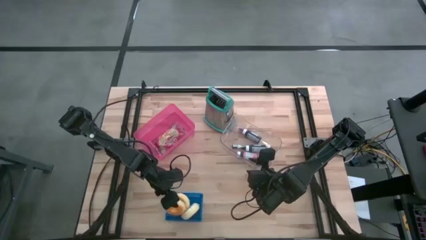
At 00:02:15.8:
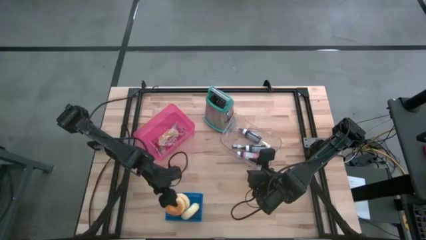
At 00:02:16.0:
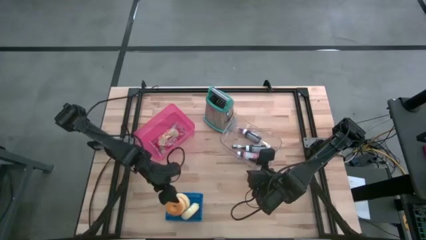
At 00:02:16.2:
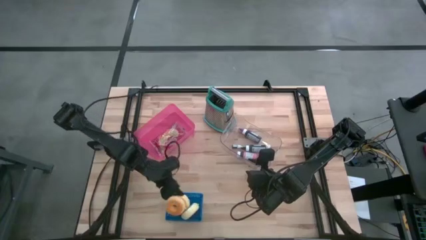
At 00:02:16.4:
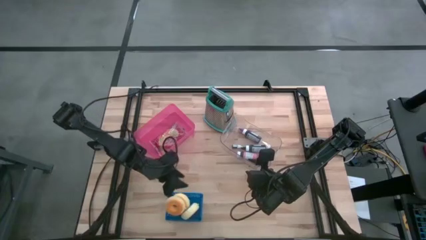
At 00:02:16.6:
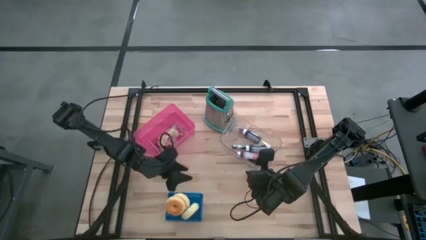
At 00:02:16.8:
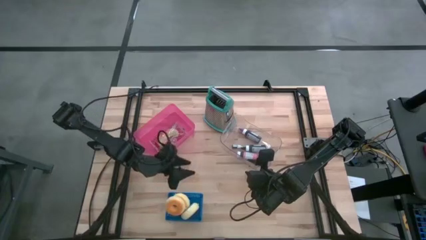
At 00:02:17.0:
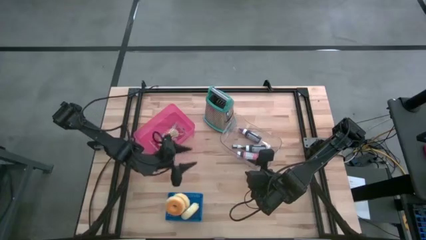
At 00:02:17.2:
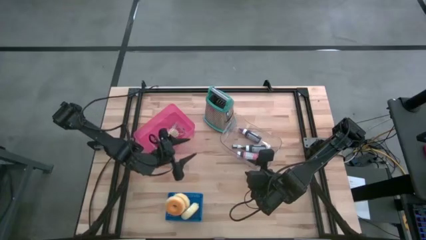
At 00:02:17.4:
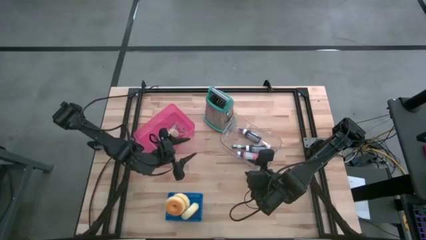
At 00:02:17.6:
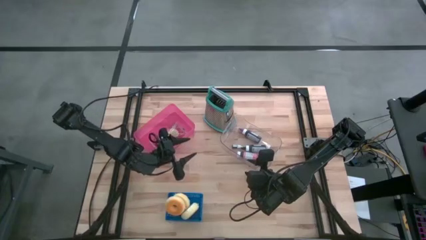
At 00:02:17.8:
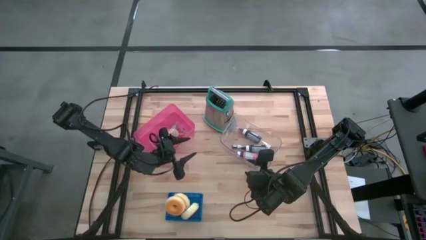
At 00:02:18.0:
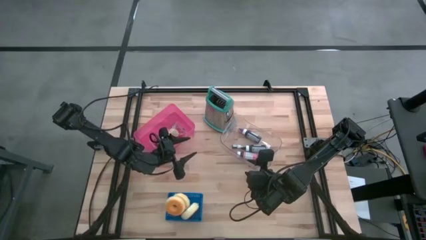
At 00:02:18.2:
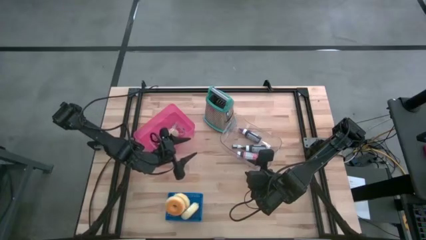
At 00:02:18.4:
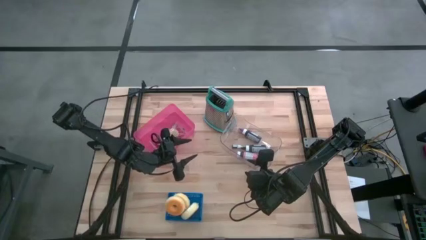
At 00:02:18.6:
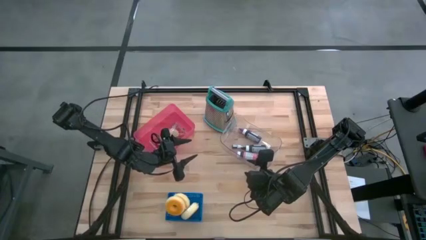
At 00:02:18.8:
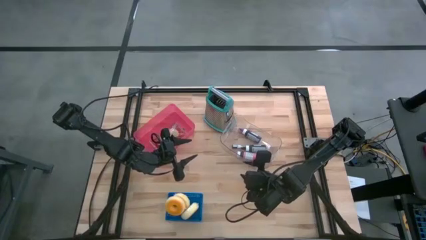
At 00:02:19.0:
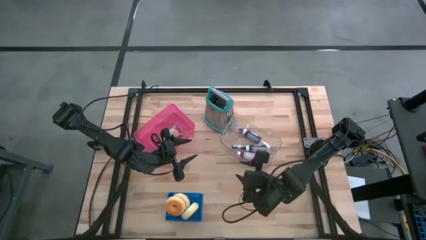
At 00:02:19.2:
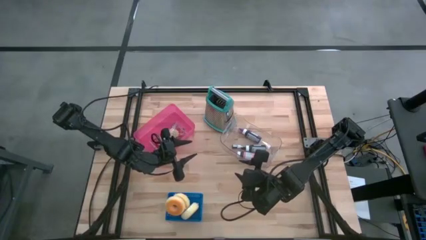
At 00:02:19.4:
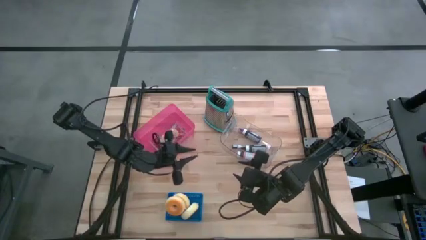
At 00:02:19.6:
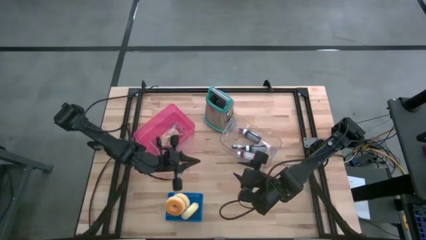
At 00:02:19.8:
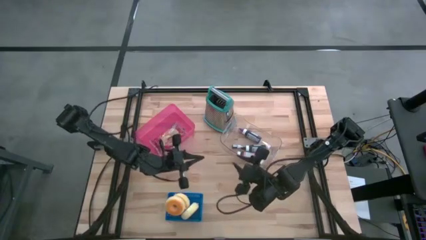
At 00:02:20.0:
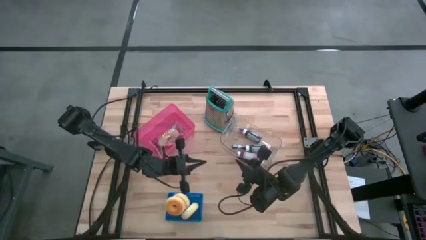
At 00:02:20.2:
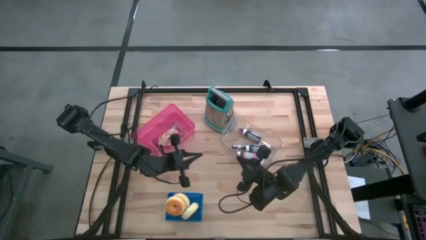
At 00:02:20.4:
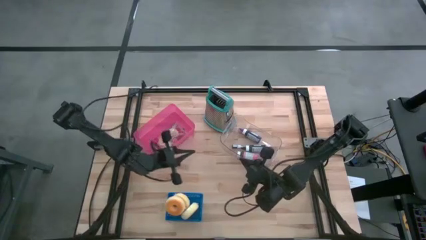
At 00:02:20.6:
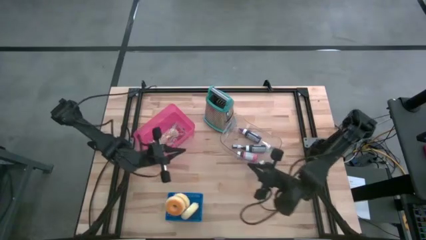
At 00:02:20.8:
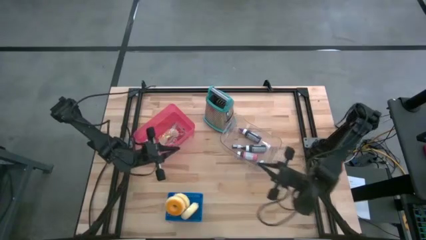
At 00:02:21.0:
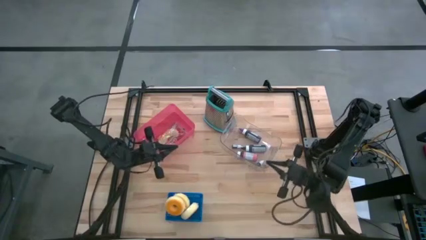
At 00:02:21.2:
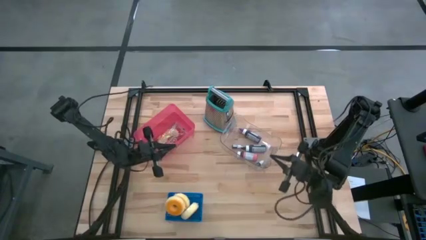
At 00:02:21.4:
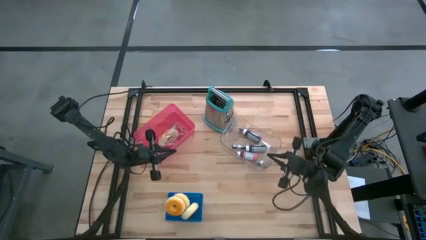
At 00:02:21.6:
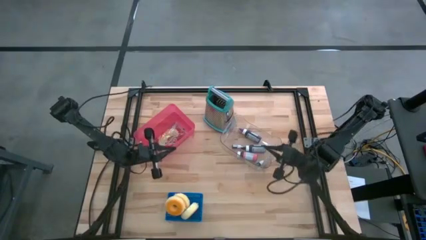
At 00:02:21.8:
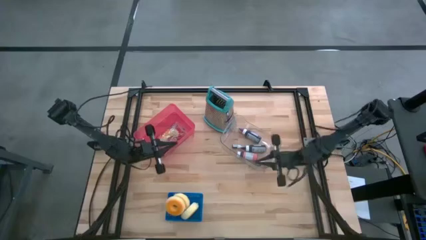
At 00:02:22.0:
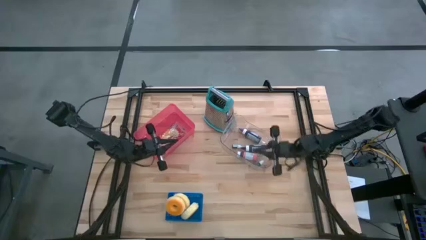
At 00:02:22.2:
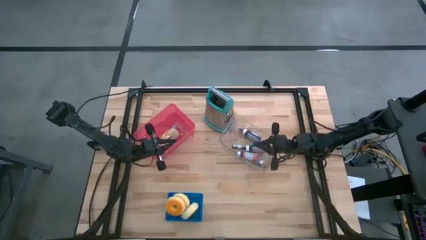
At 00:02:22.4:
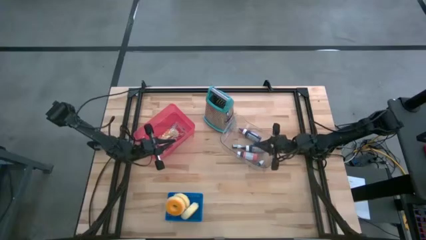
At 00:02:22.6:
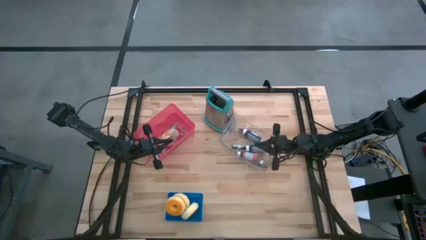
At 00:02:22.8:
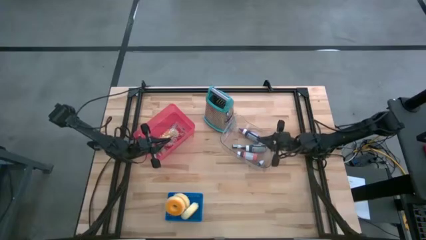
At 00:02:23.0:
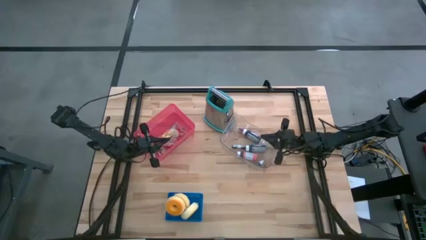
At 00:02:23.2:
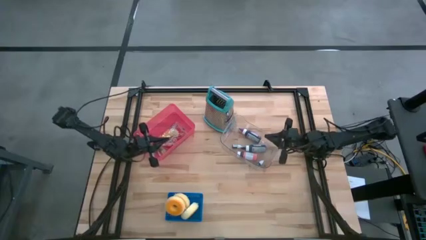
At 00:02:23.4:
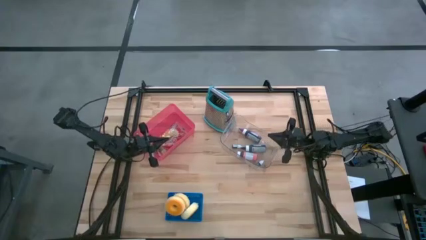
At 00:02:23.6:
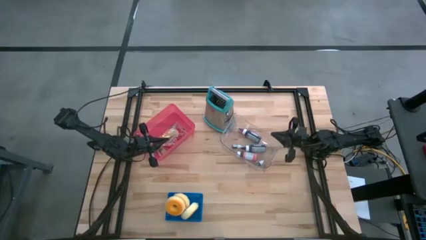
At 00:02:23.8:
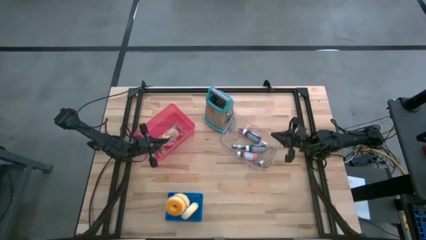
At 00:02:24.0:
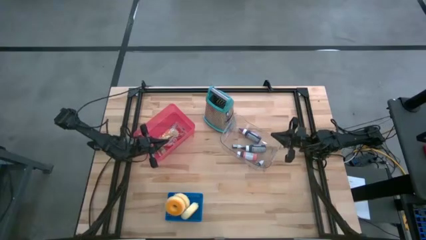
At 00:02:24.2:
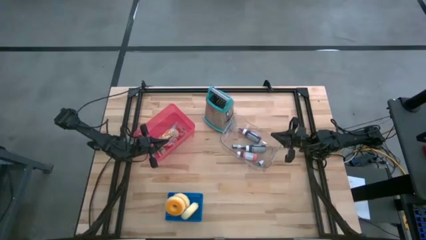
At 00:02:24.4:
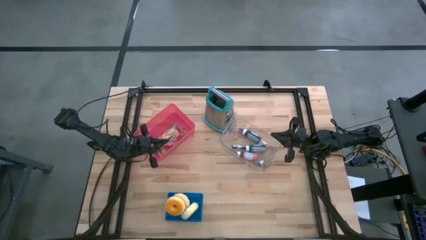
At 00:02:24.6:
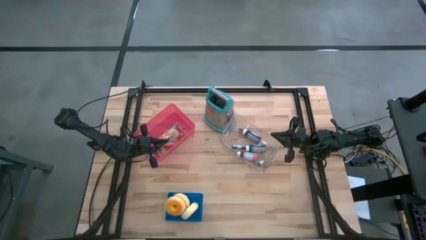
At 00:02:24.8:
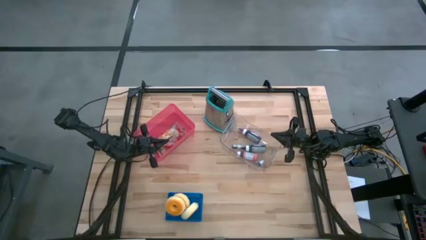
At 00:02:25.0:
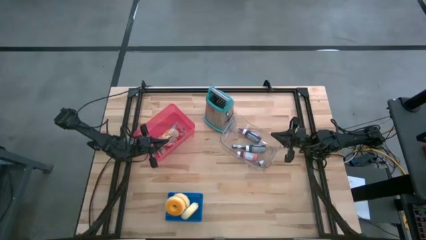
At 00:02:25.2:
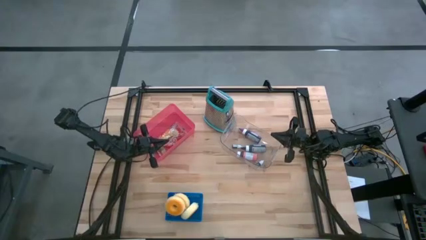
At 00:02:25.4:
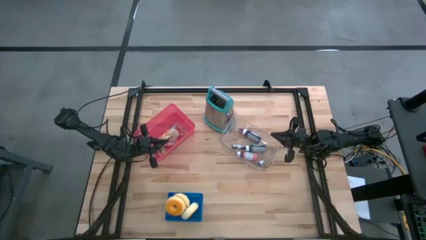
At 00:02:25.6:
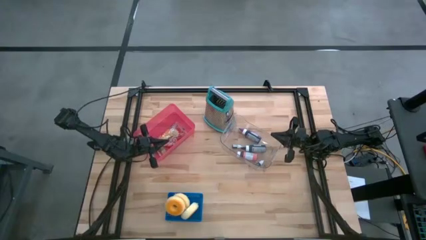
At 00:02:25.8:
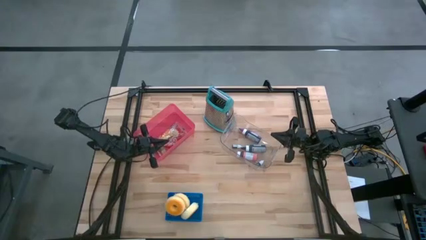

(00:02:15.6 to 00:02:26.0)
Task: Pick & Place Food Item
Return to Home Position

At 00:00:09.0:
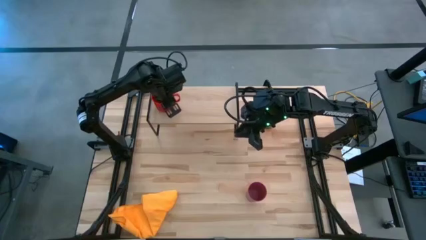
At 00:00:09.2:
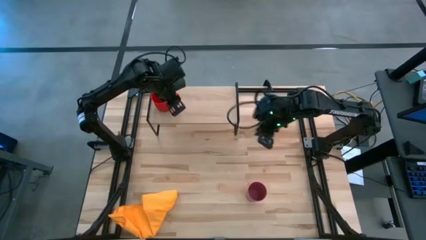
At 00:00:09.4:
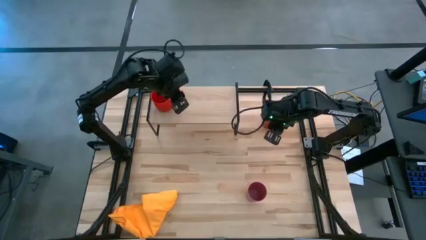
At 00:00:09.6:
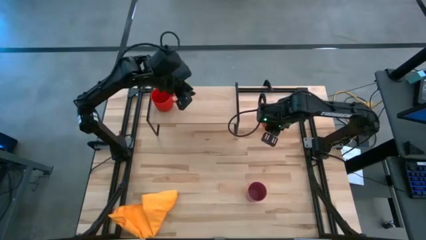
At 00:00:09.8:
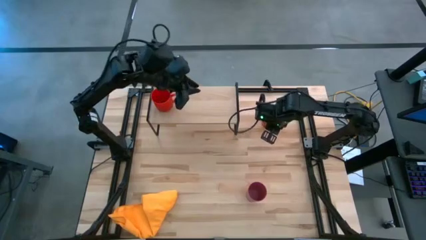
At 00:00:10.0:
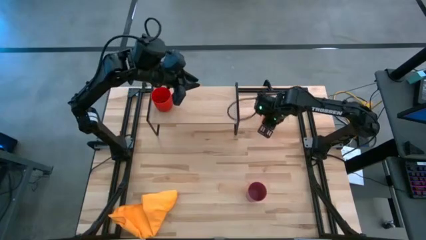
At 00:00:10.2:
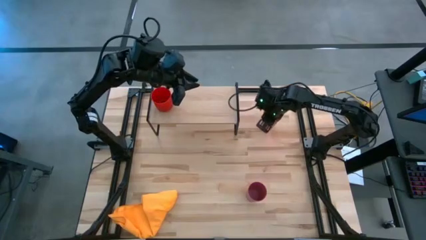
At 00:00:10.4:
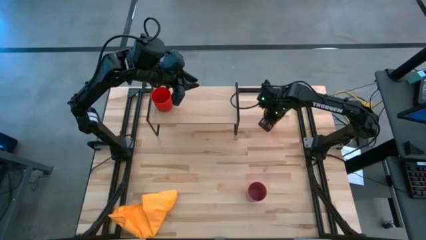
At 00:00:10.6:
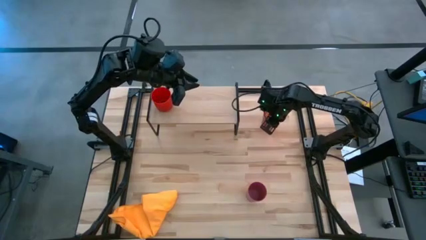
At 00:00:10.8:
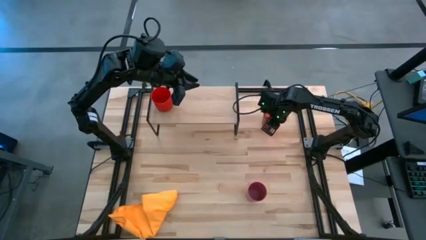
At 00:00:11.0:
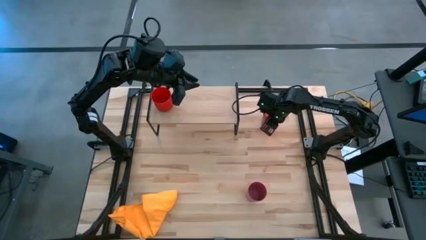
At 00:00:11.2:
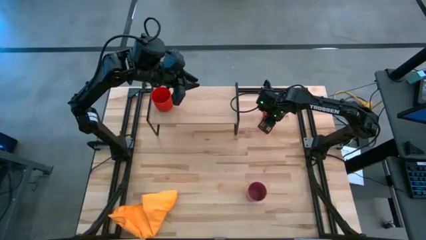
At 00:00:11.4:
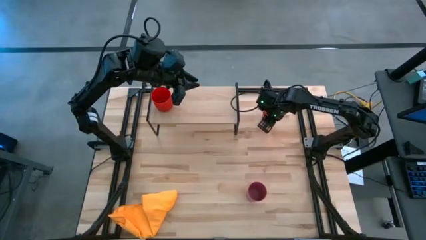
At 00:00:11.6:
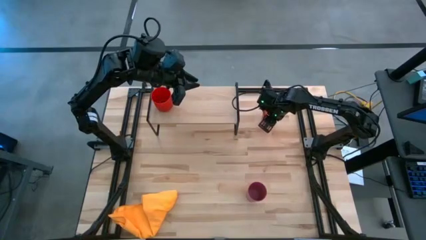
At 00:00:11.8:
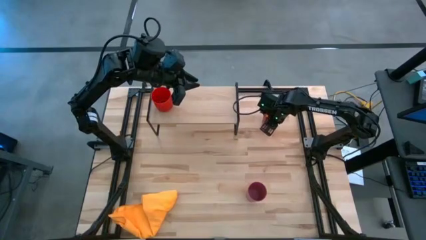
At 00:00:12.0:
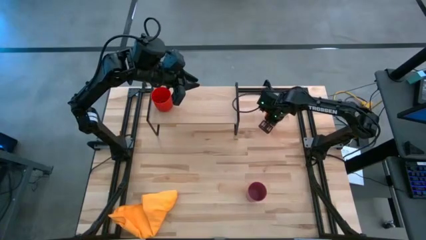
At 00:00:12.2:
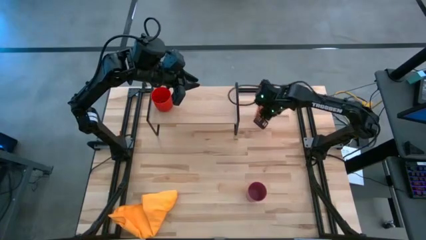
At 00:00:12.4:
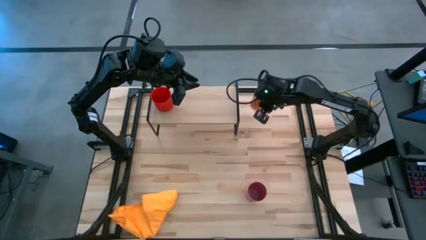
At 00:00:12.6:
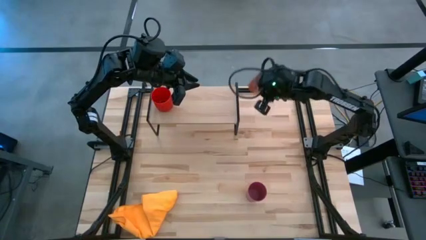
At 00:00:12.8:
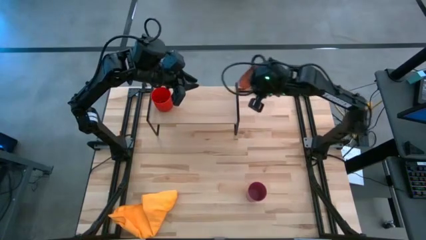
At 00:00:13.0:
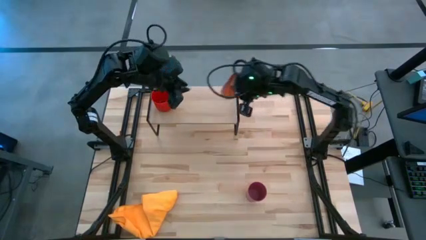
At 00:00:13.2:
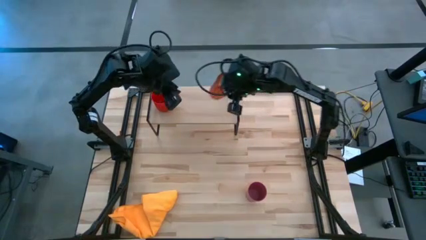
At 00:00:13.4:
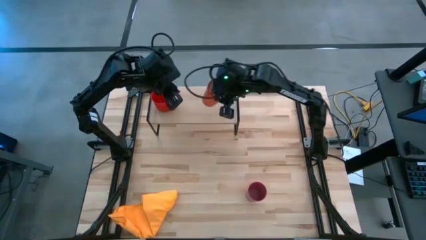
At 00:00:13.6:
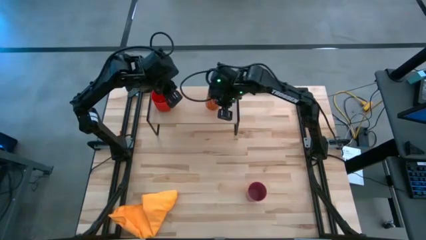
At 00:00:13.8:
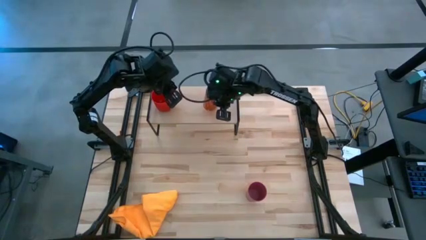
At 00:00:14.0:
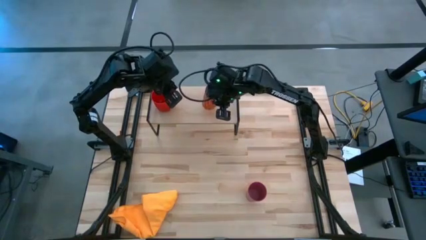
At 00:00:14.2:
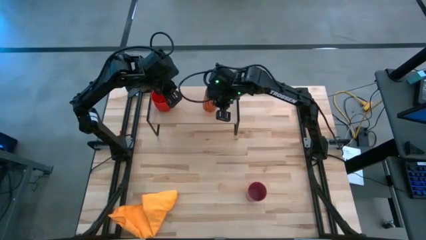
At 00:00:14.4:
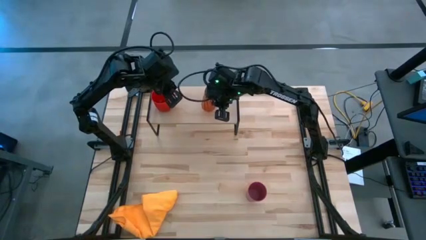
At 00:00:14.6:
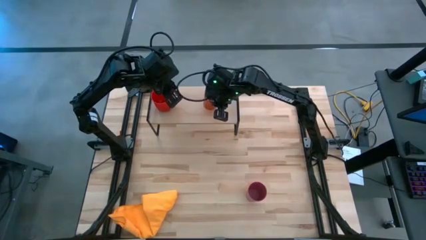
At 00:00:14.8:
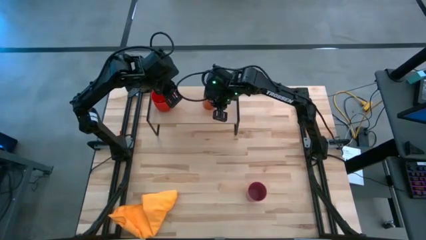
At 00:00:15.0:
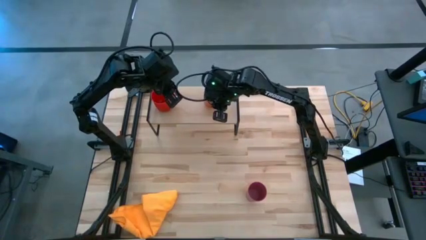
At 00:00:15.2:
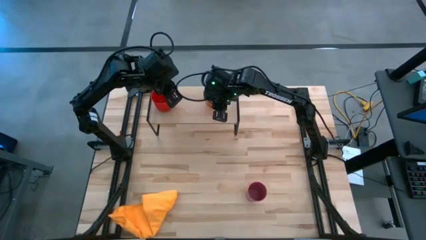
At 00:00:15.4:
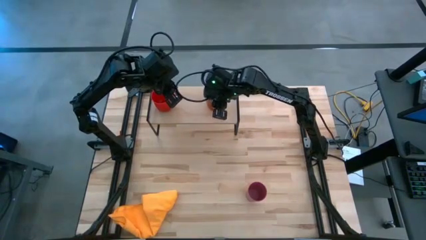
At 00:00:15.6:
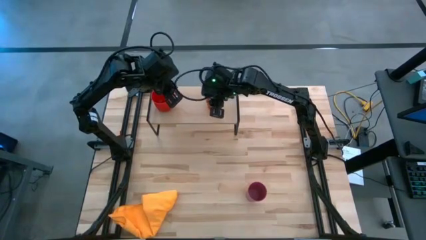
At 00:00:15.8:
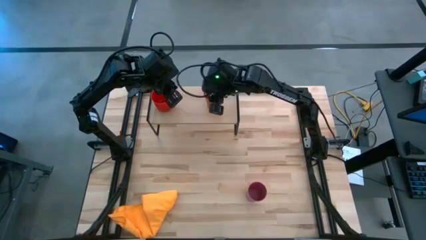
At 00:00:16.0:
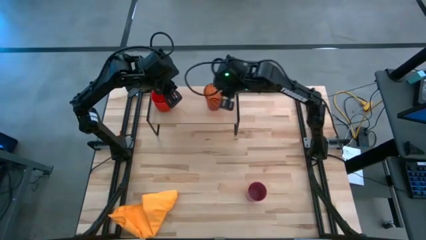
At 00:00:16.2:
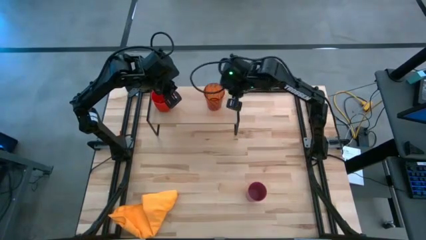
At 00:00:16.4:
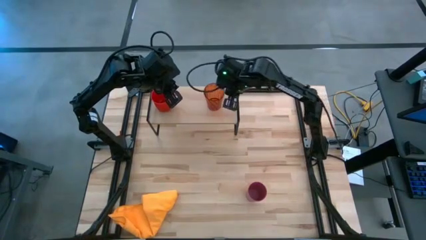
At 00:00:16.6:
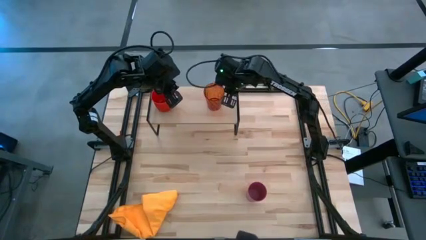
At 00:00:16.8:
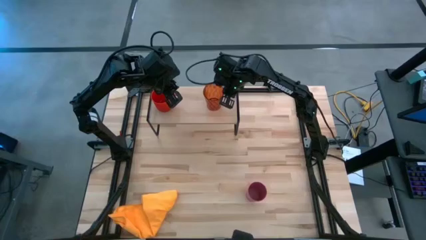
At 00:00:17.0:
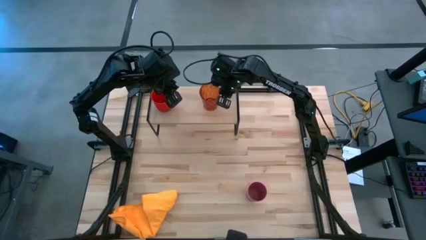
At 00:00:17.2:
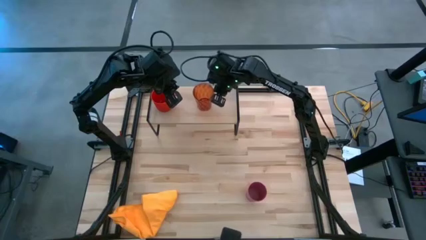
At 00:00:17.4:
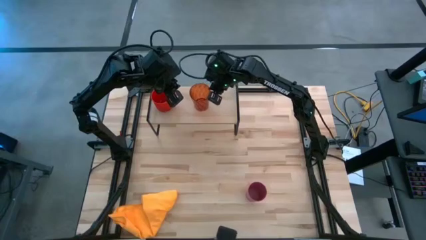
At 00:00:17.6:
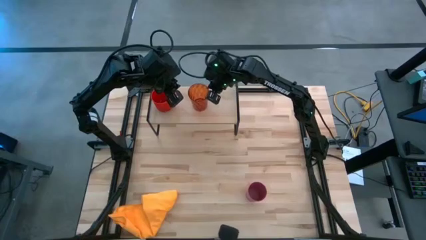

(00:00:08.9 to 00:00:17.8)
Task: Stack small to large cups/mugs on shelf
Put the orange cup on the shelf
